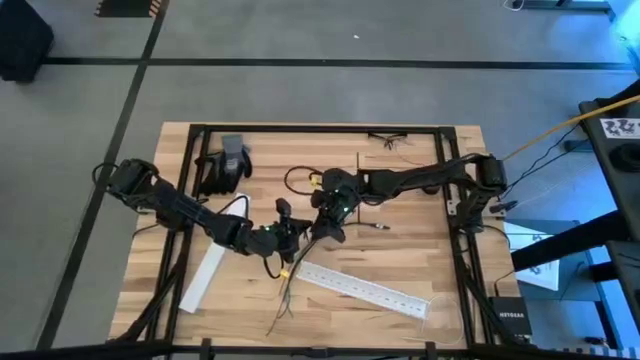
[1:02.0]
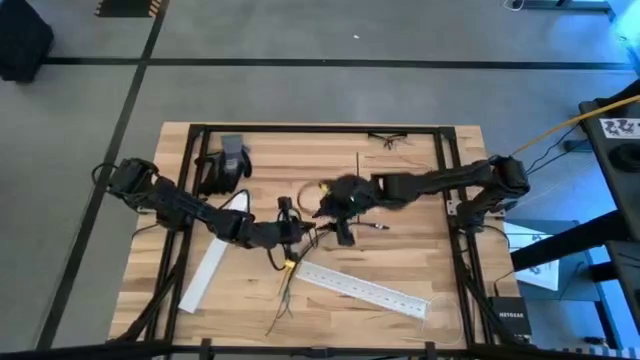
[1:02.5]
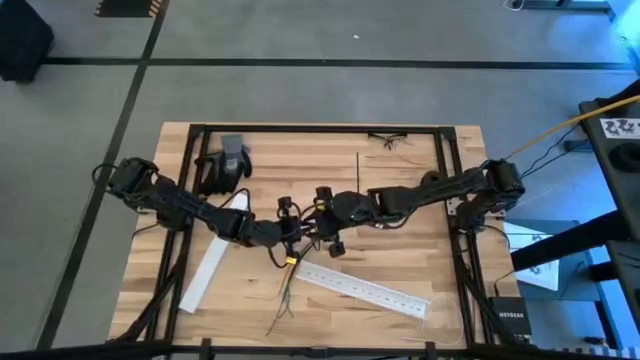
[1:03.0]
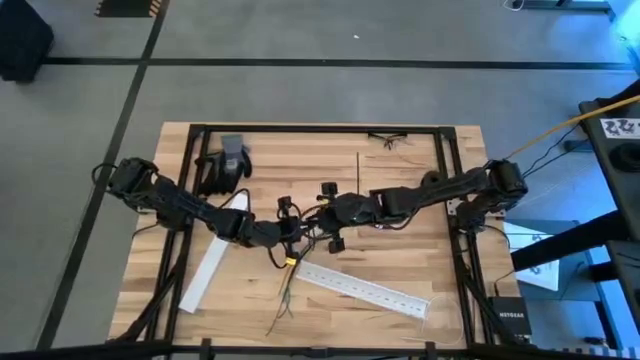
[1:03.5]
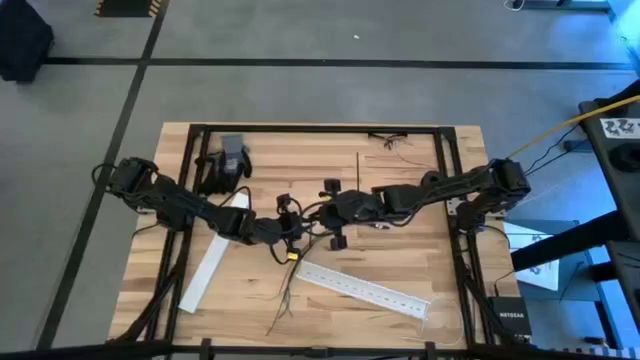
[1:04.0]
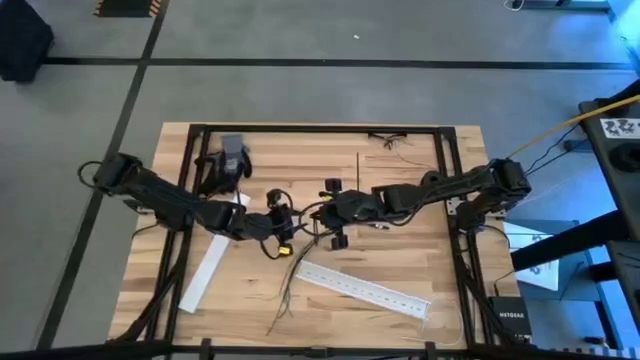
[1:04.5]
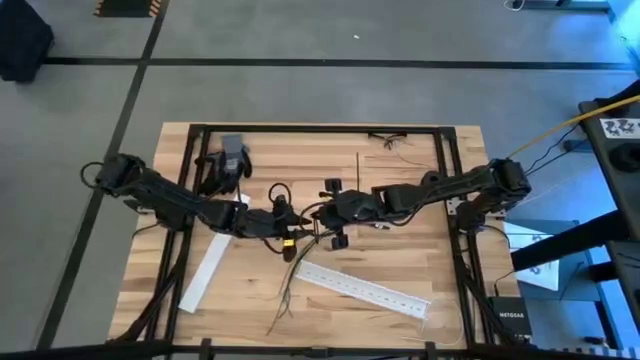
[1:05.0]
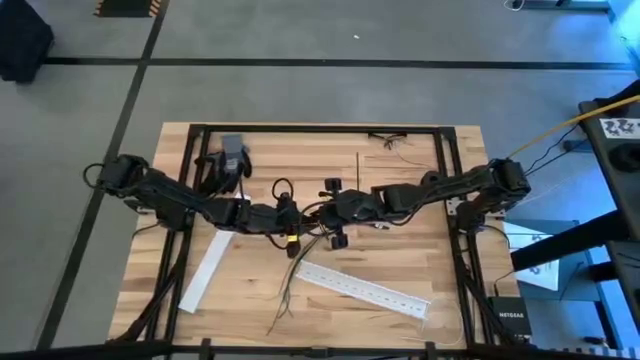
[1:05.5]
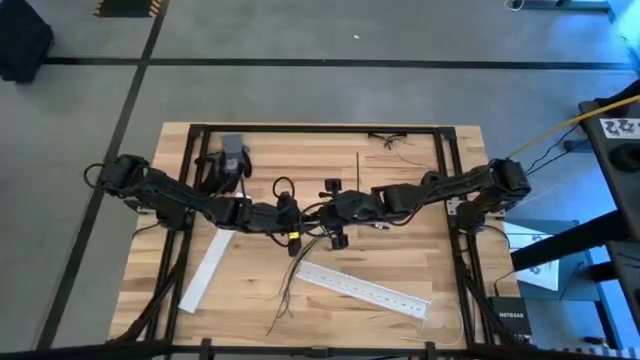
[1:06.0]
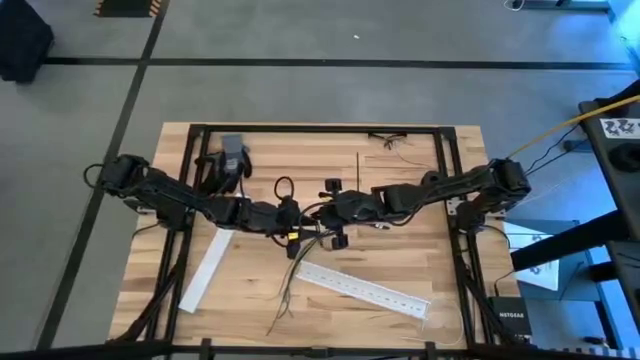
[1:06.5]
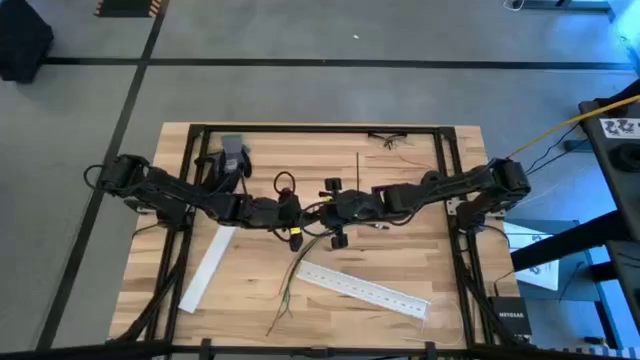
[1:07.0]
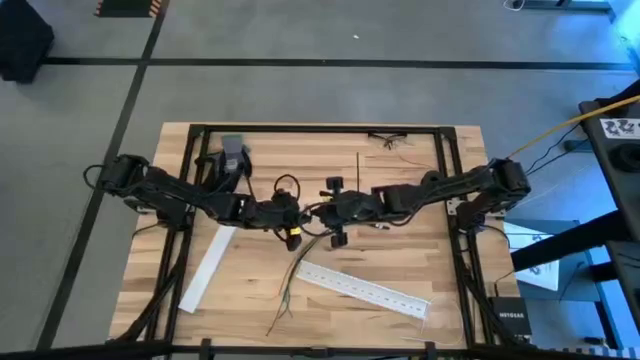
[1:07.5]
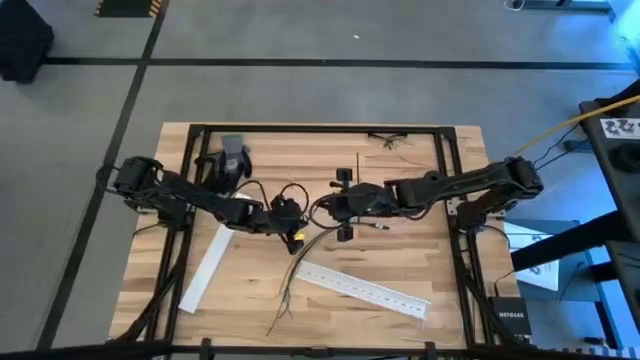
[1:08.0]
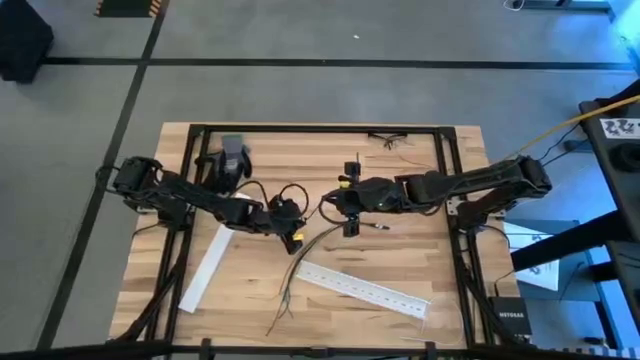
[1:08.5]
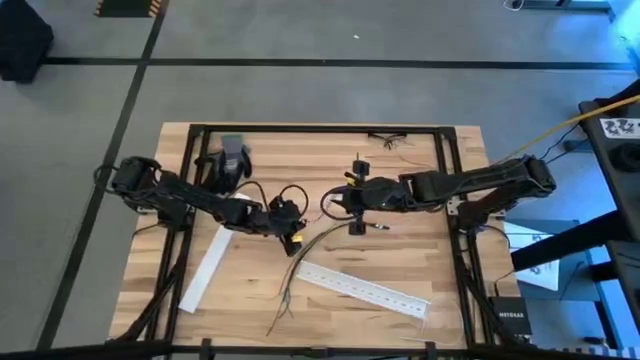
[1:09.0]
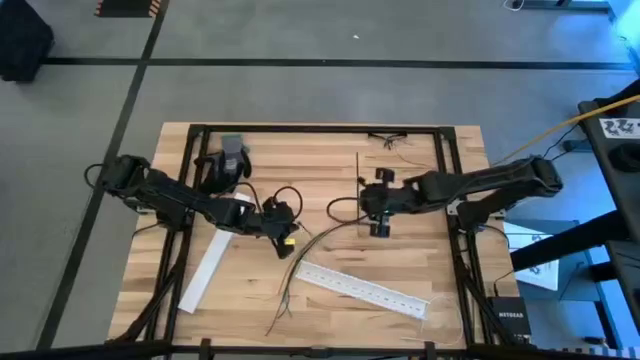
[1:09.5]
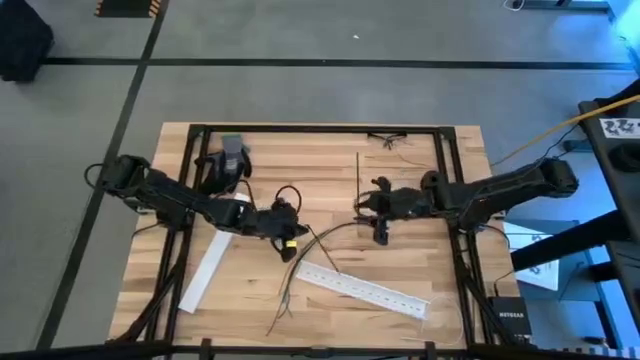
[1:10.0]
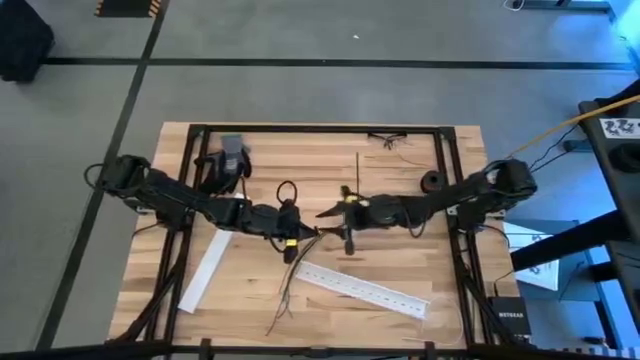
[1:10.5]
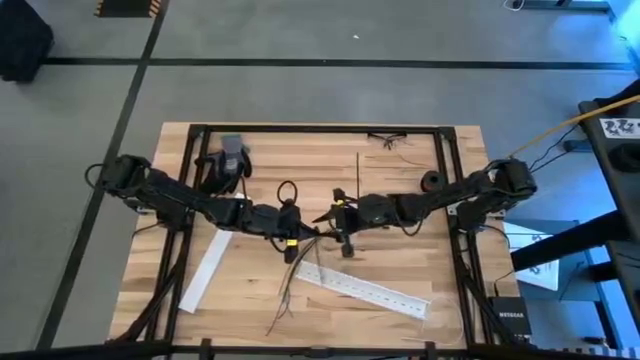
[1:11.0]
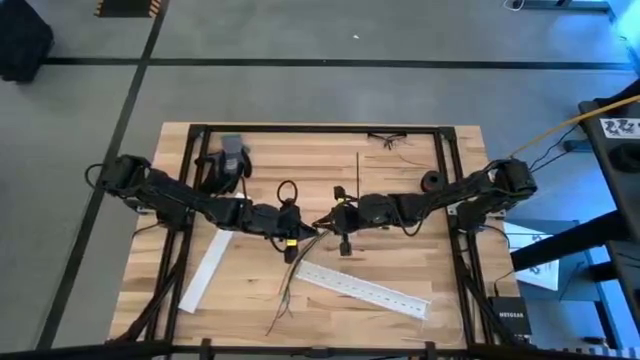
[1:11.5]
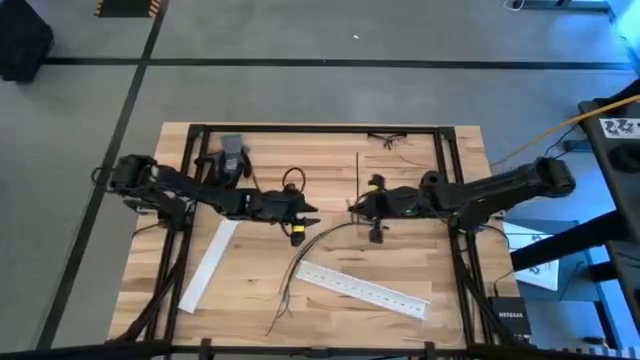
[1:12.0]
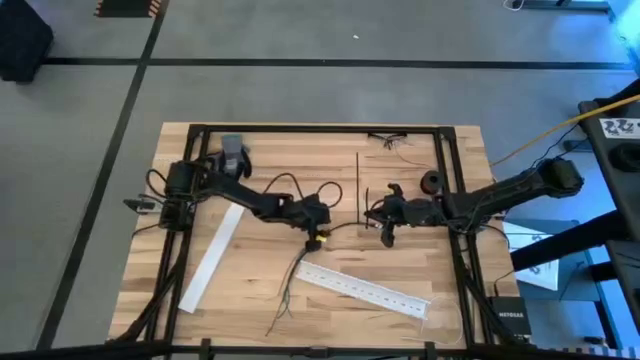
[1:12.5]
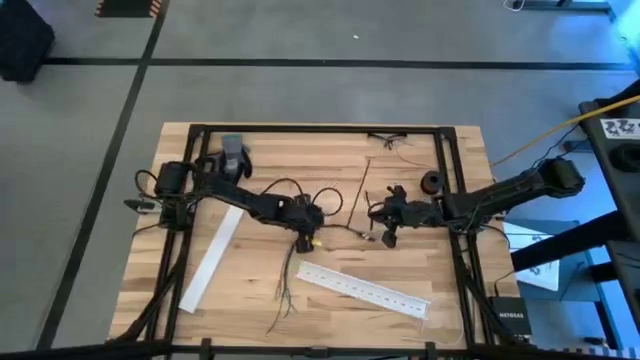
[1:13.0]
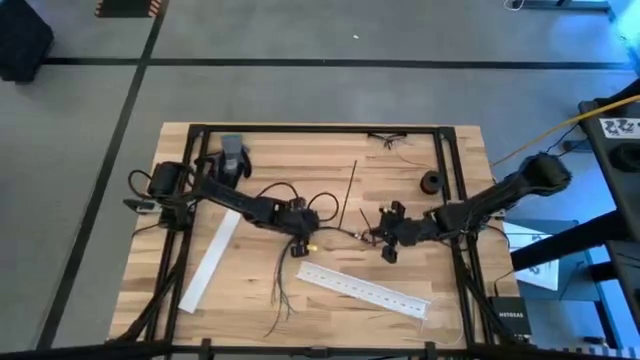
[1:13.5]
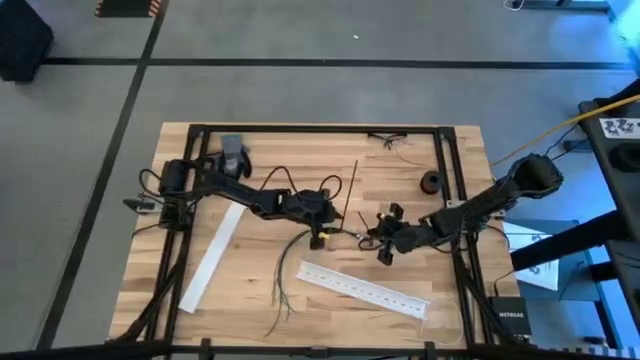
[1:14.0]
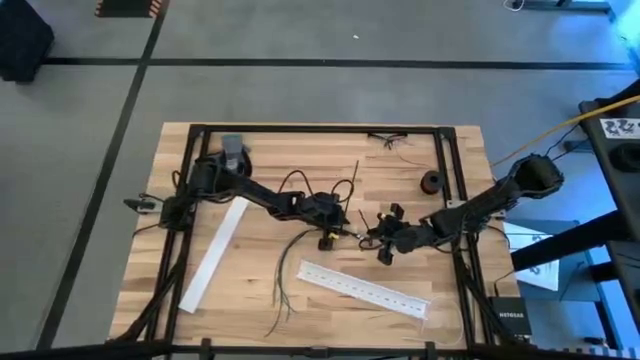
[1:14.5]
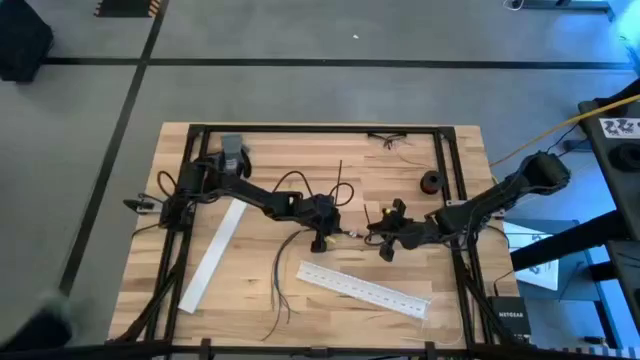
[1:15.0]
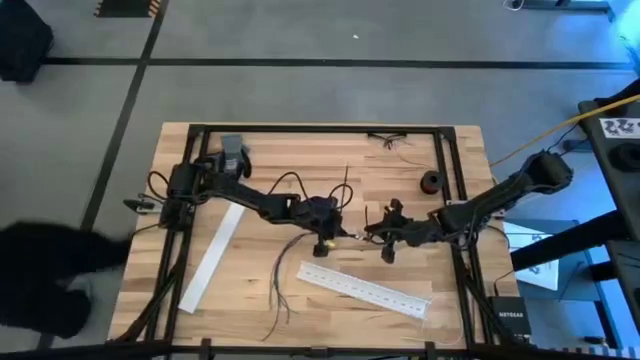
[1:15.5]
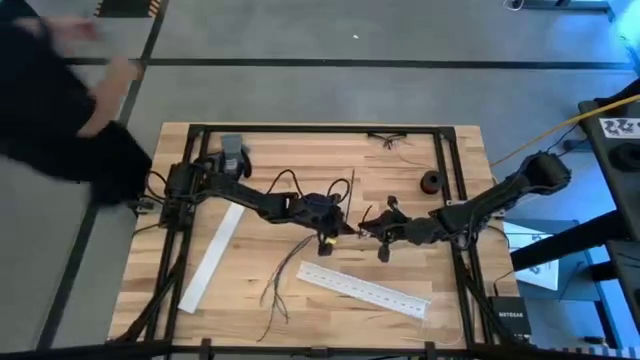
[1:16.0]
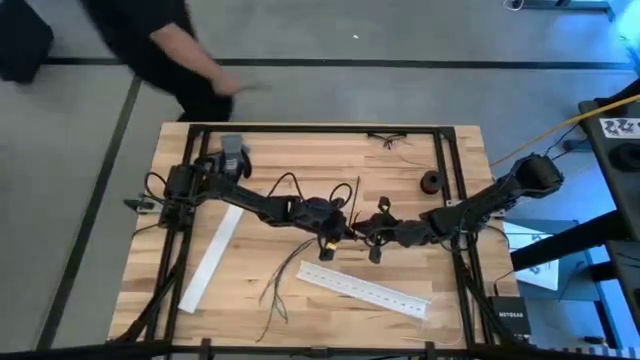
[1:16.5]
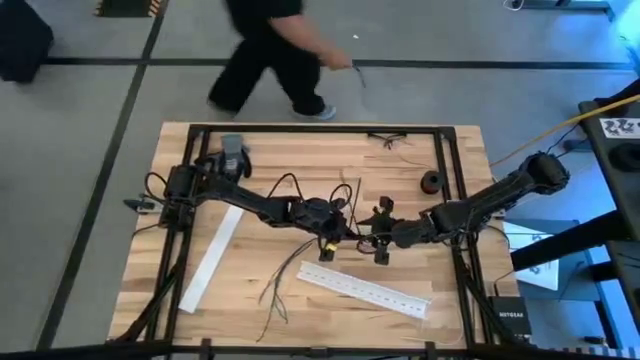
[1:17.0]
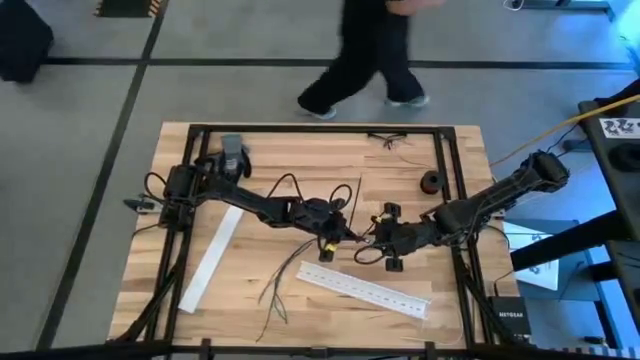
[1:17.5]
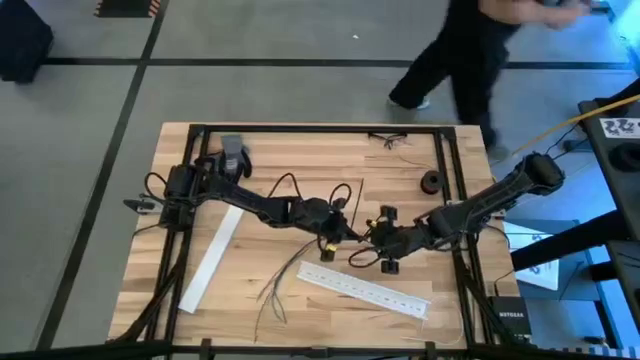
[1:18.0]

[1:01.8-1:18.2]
Task: Ziptie cables
Wrap the cables together using the top zip tie

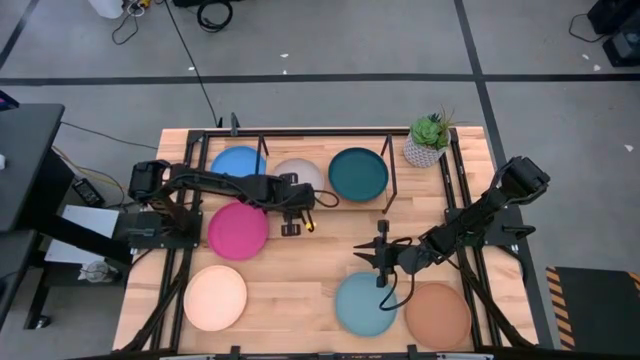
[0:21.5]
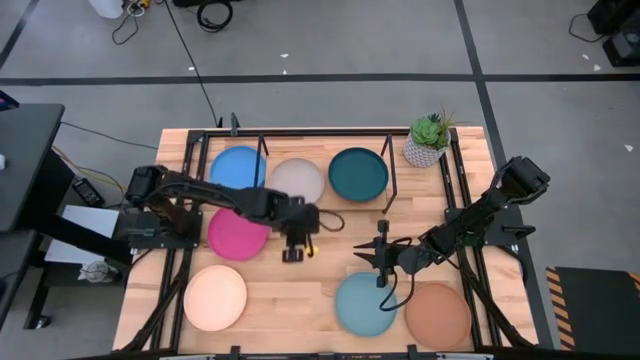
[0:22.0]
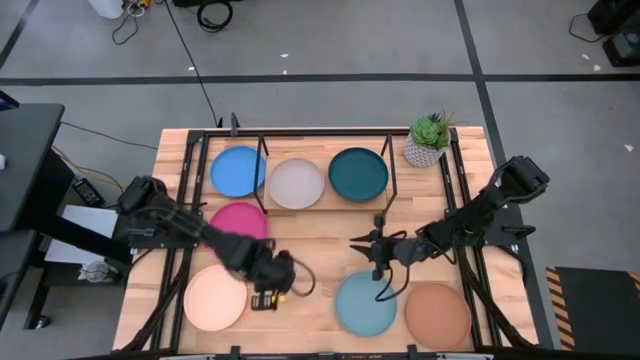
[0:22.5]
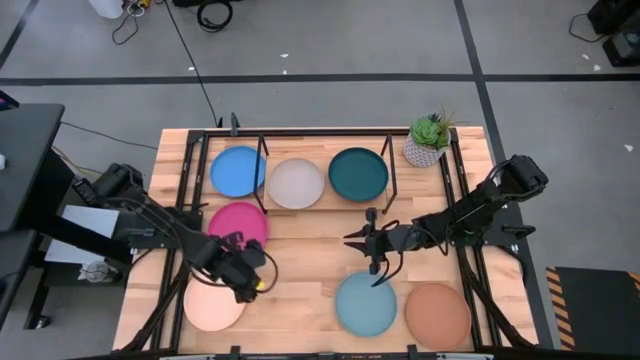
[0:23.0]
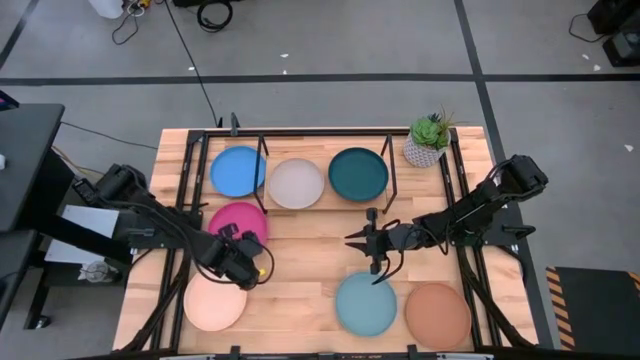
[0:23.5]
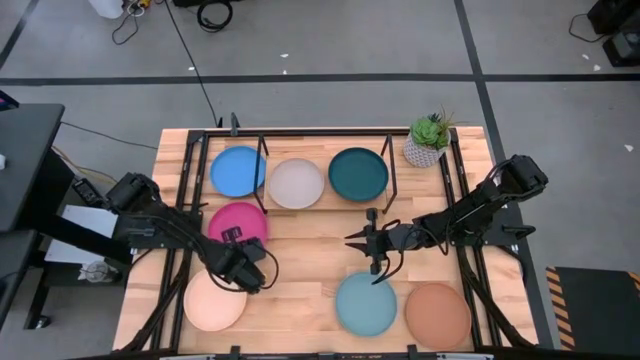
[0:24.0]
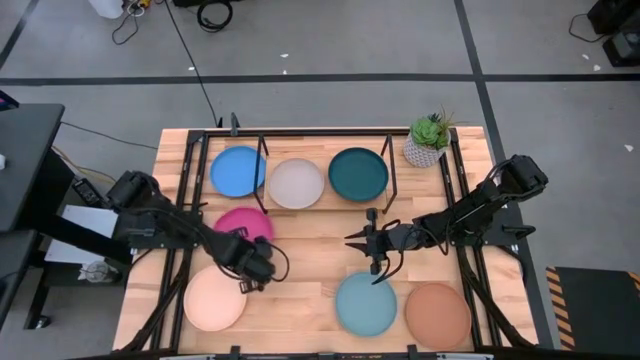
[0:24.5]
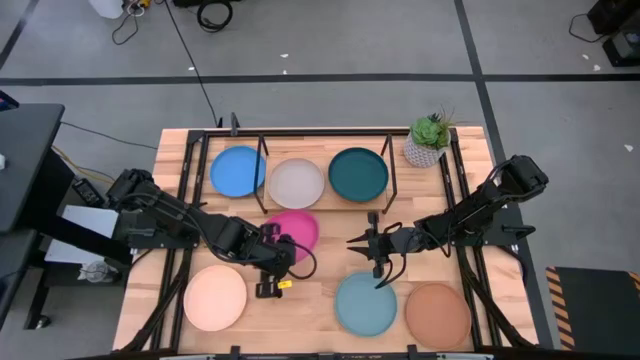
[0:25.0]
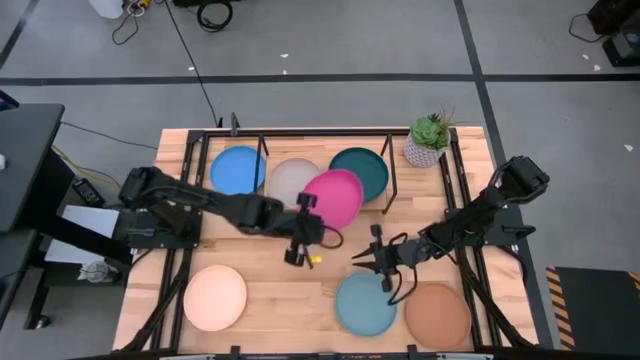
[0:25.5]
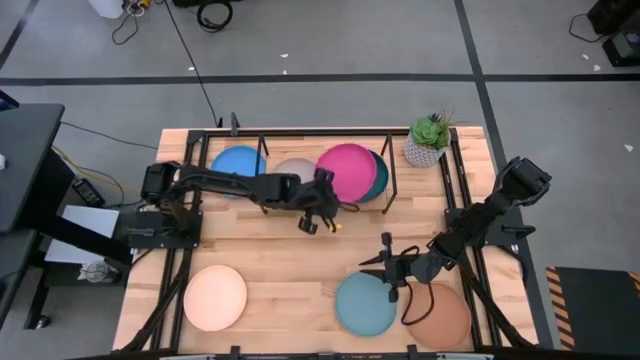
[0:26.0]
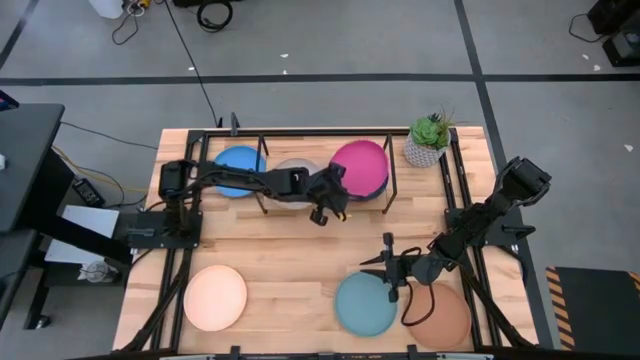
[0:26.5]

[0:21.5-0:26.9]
Task: Place and stack plates onto a shelf
Stack the pink plate on top of the dark green plate on the shelf
